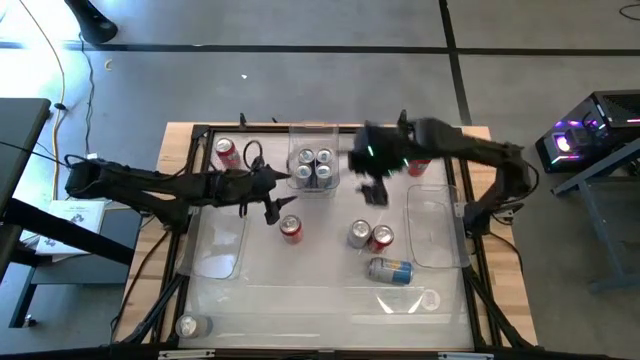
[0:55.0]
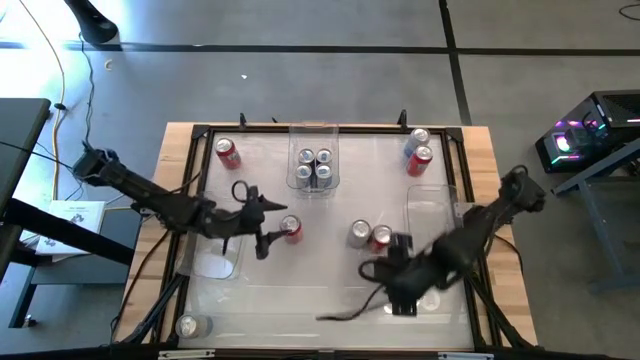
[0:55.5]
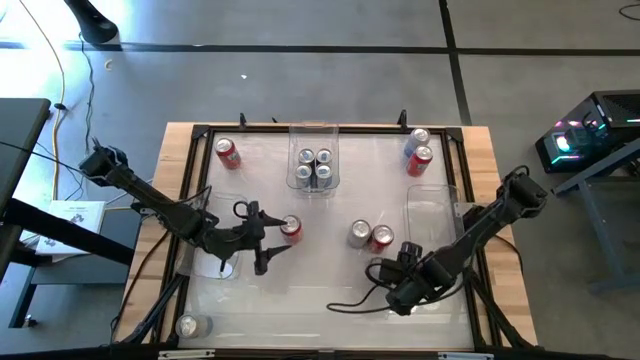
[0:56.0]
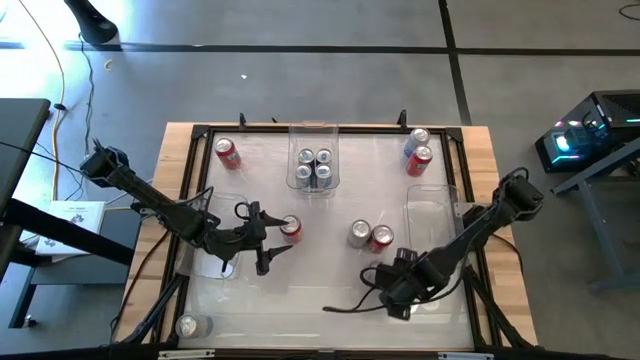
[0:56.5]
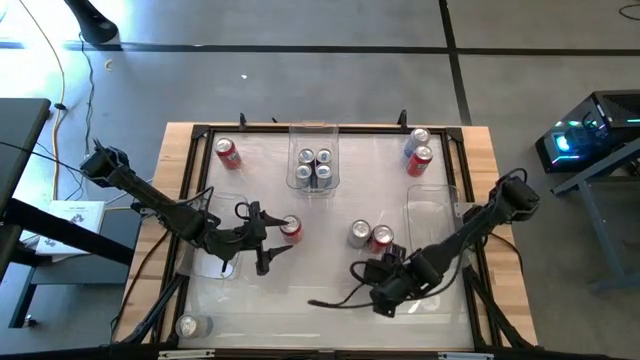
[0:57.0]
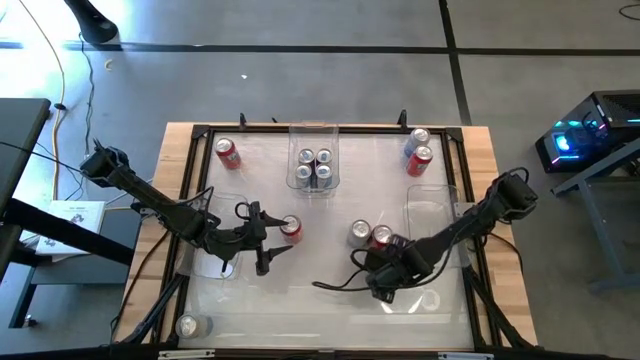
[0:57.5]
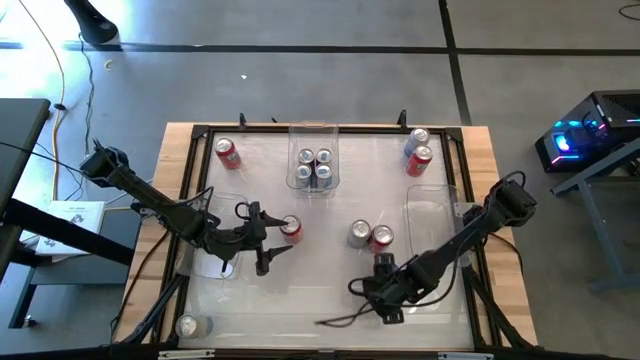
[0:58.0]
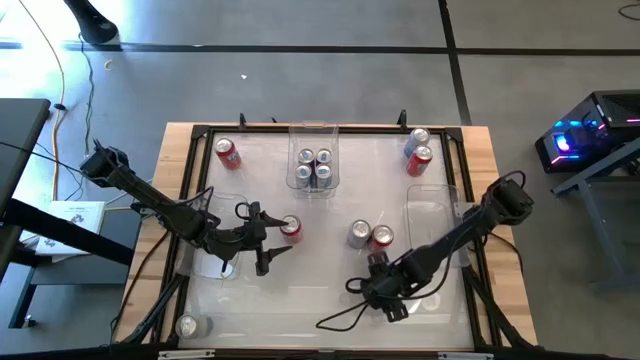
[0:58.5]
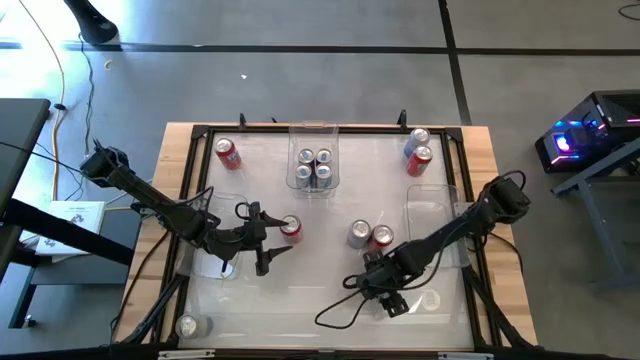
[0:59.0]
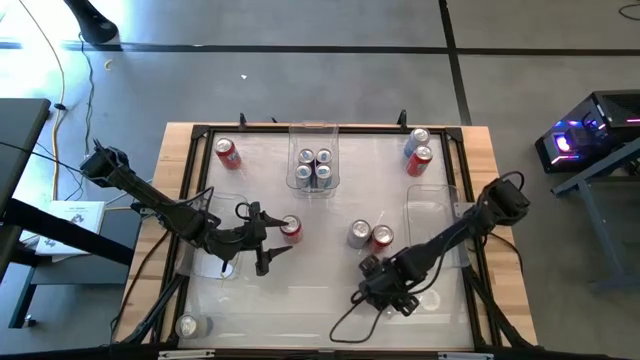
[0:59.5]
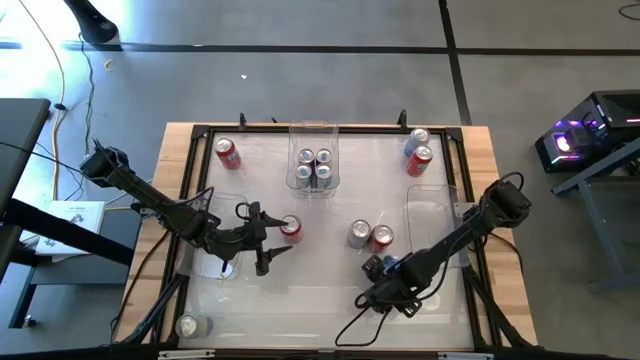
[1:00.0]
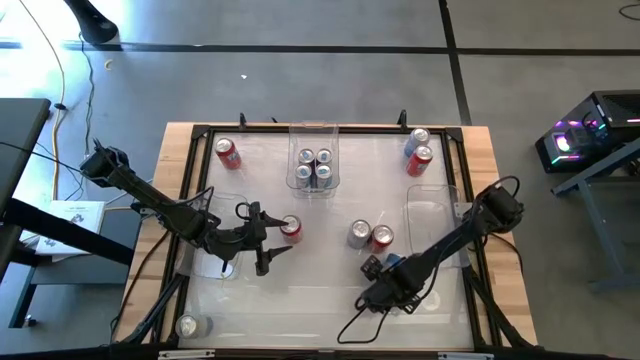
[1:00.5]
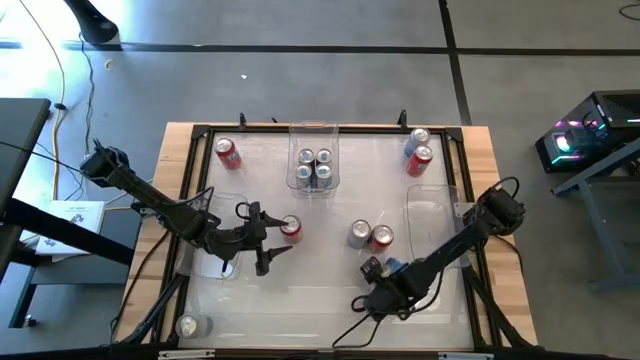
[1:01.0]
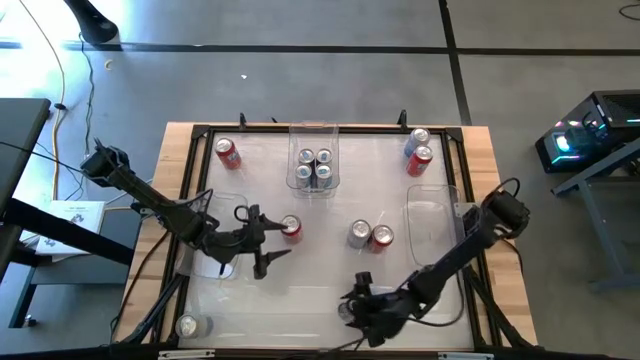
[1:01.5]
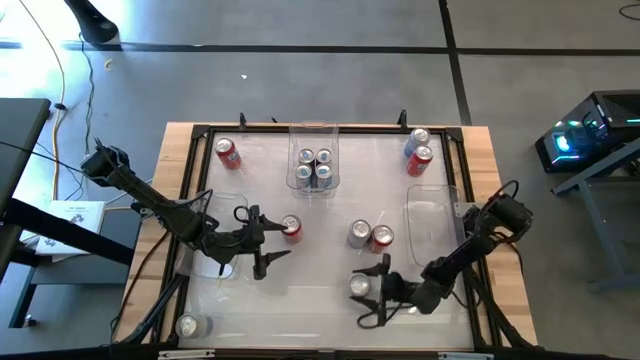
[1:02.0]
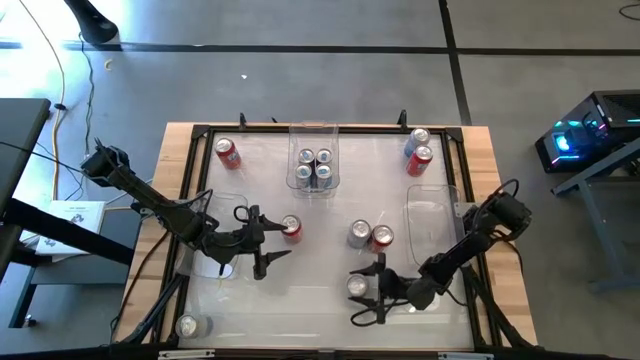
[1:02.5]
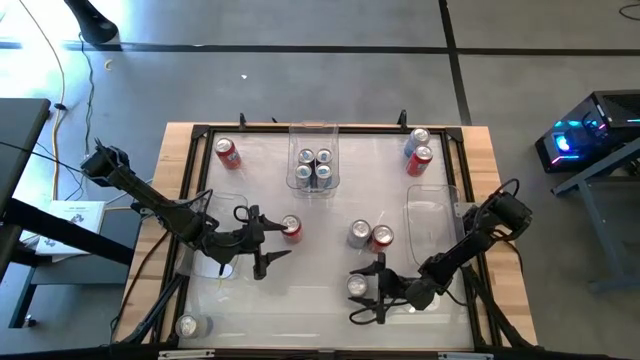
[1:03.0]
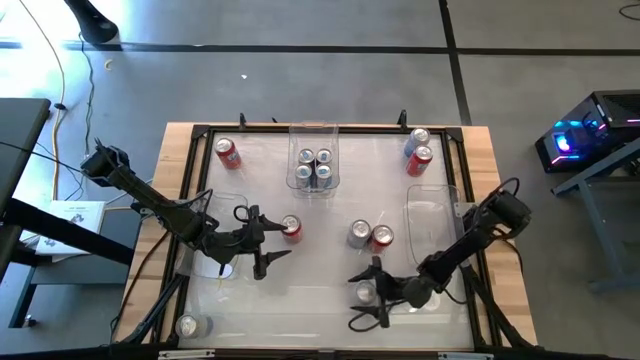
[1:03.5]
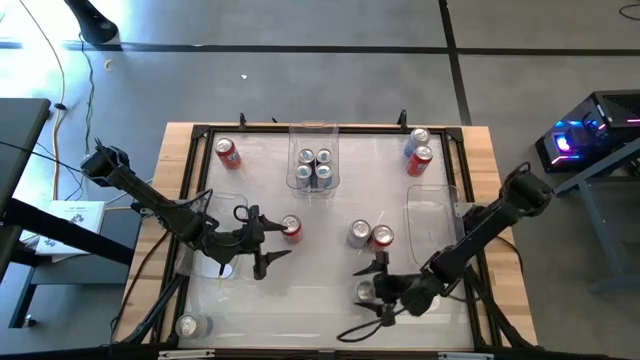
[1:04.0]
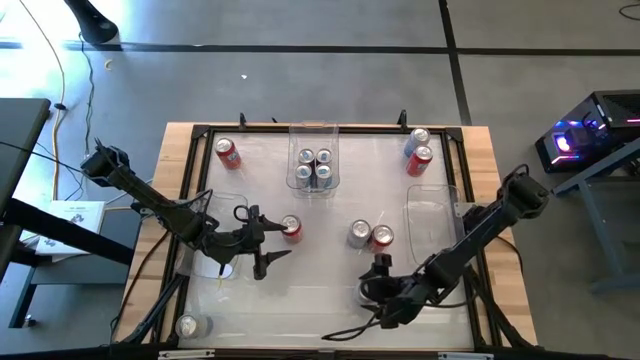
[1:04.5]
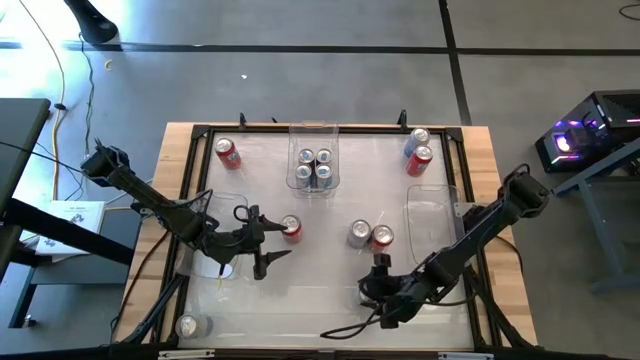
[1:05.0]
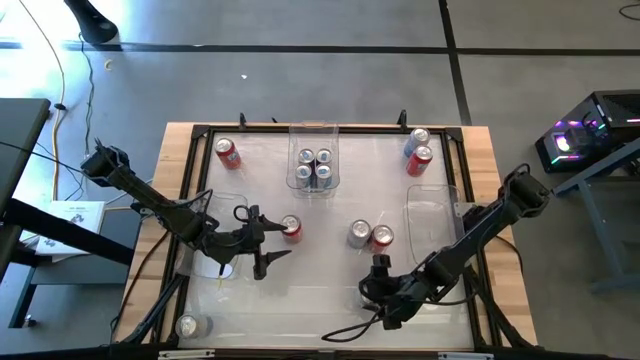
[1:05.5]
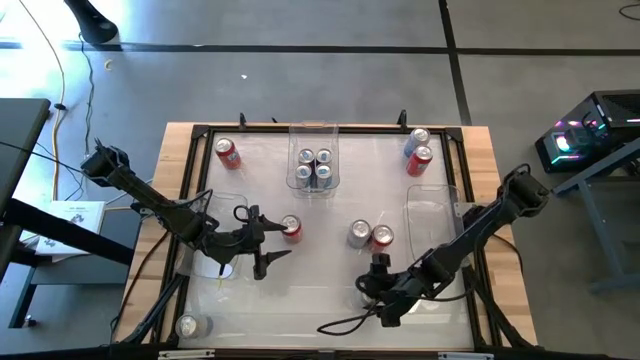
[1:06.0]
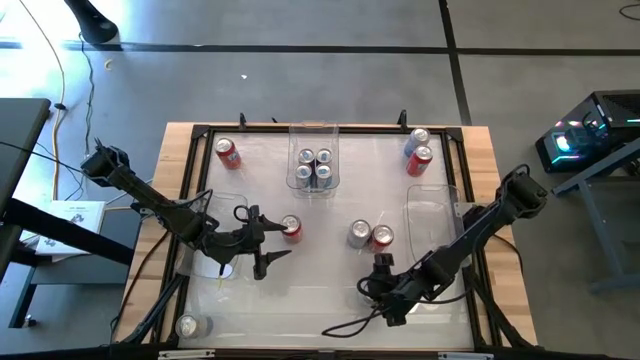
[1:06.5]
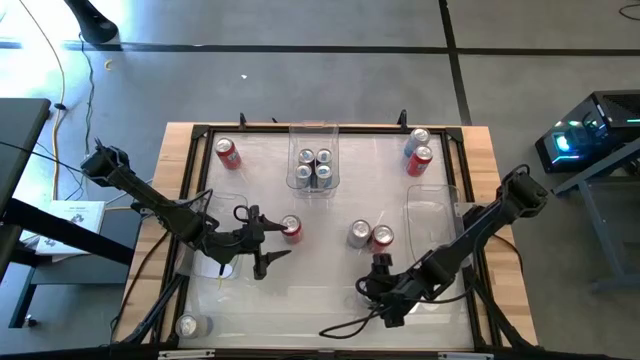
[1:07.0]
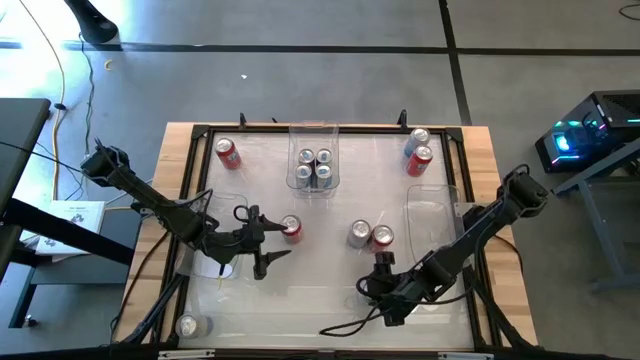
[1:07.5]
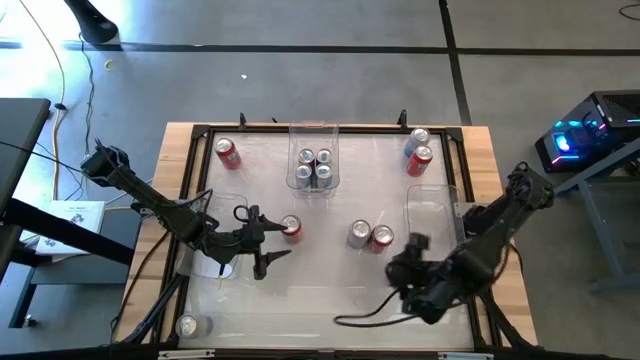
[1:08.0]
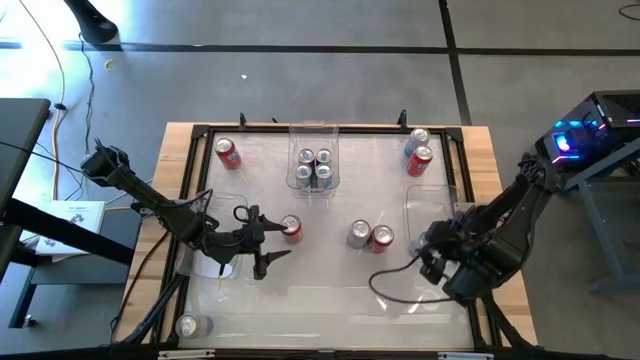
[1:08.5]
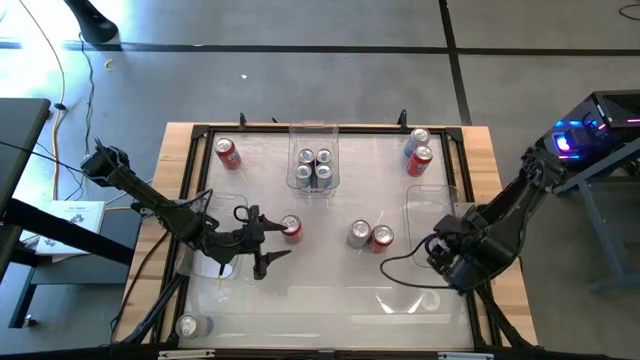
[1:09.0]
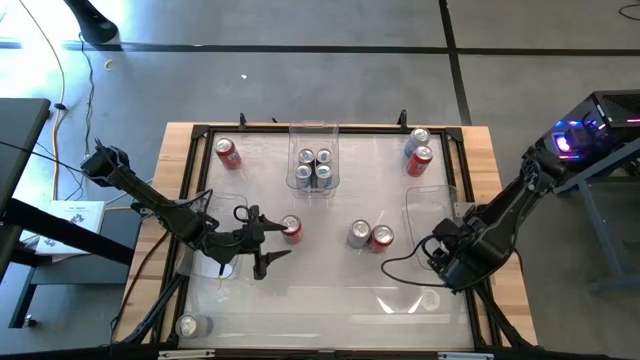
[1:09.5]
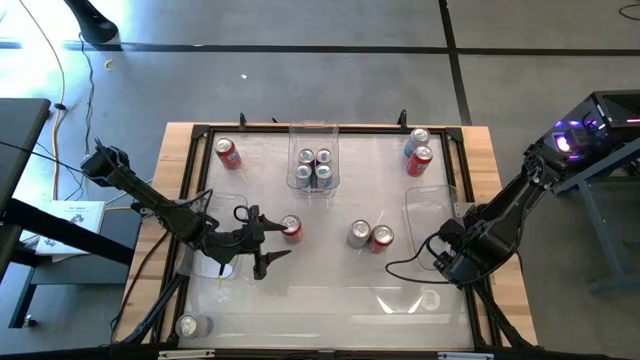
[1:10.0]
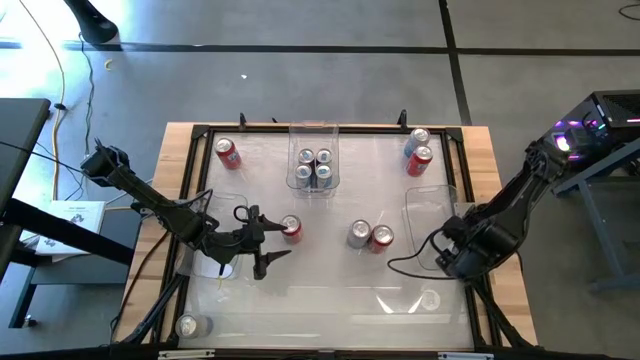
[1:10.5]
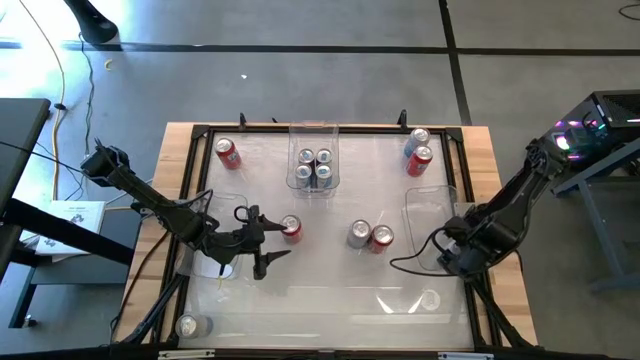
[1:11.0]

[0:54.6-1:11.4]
Task: Sort soda cans
Put the bottom right blue-white soda can into the bottom right transparent bin

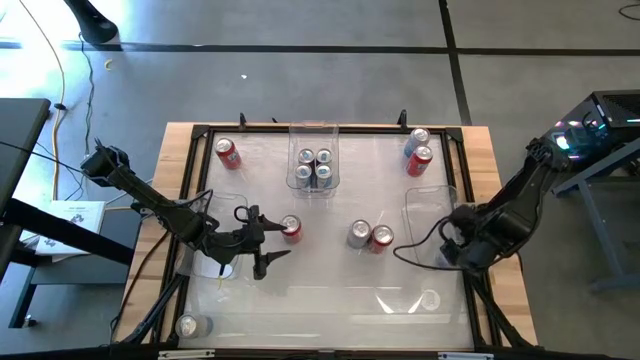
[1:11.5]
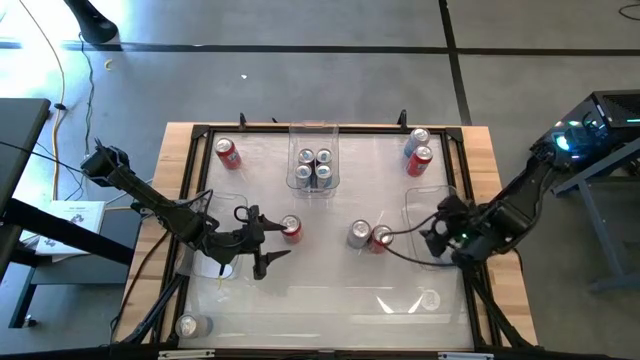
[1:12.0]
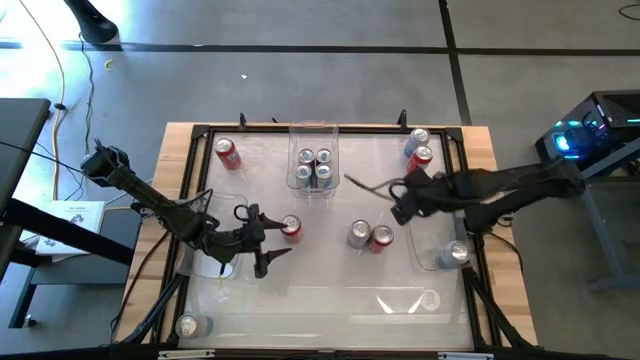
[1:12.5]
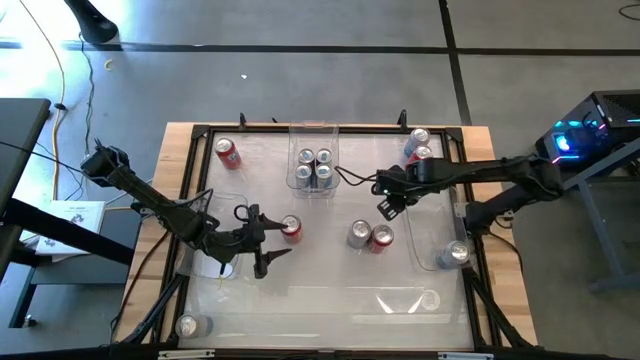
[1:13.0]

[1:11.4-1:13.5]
Adjust the bottom right center transparent bin

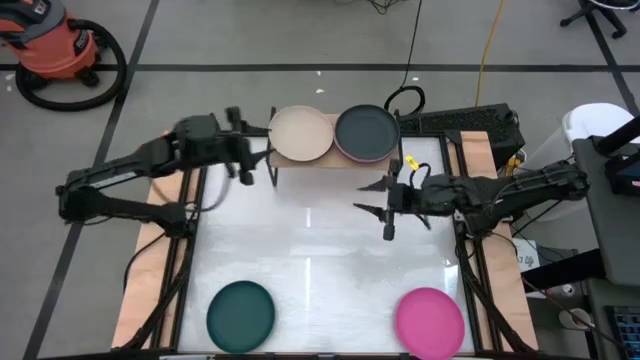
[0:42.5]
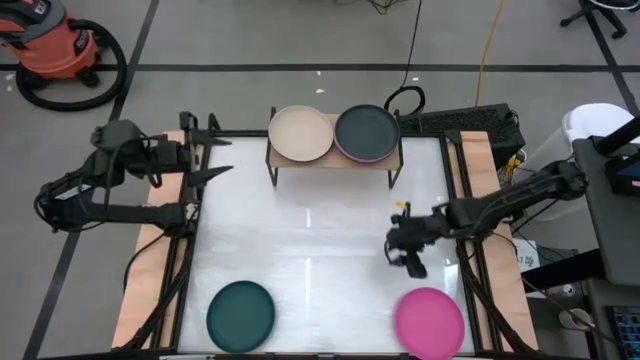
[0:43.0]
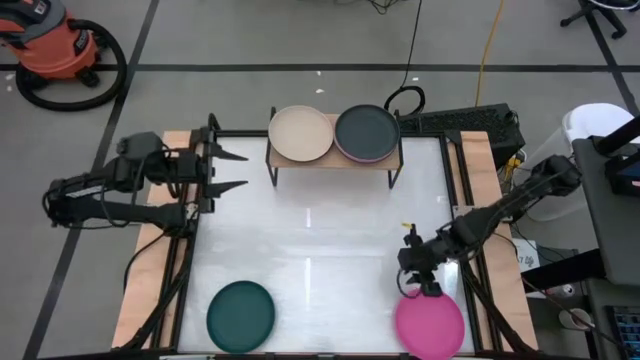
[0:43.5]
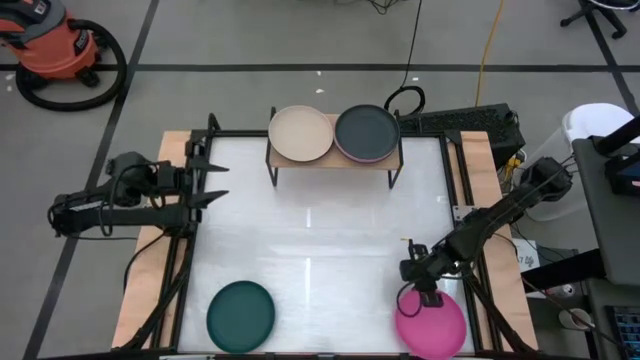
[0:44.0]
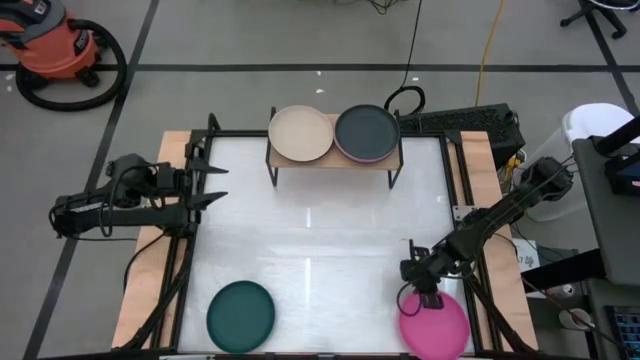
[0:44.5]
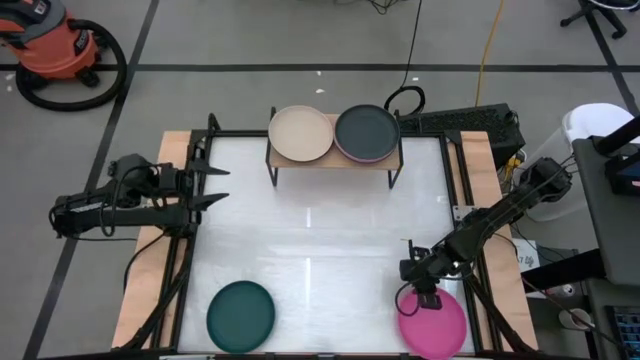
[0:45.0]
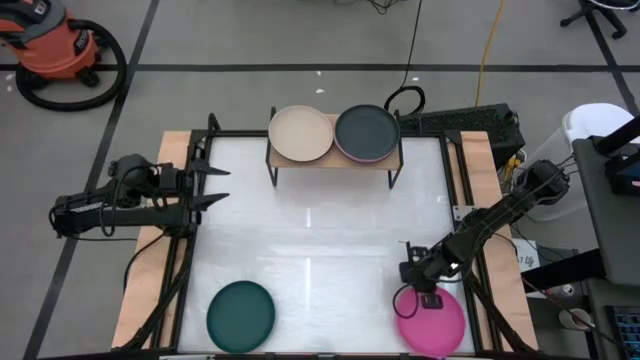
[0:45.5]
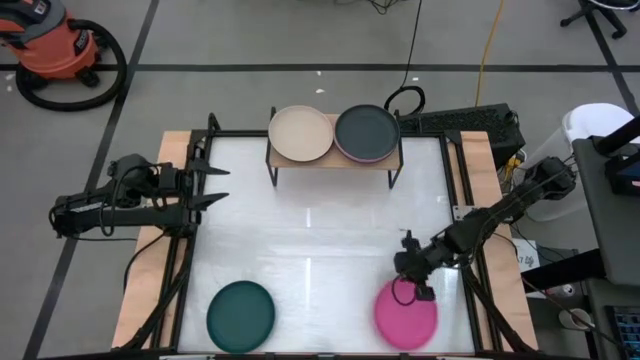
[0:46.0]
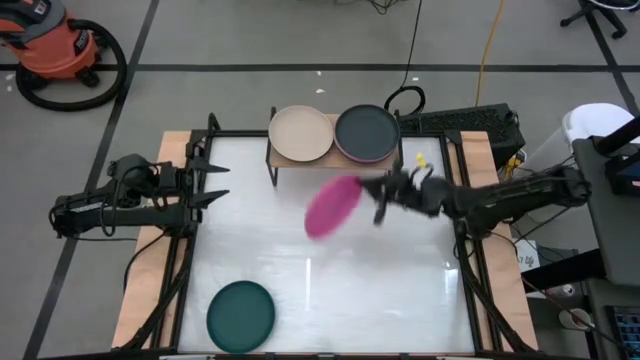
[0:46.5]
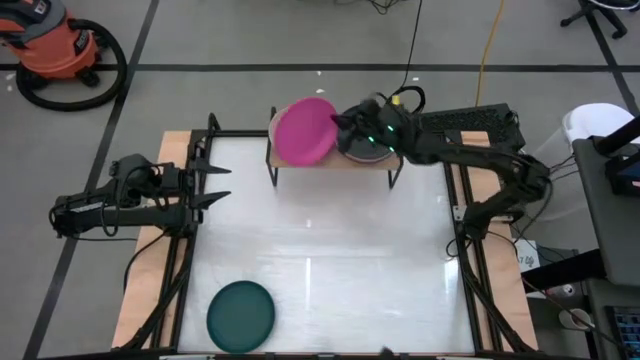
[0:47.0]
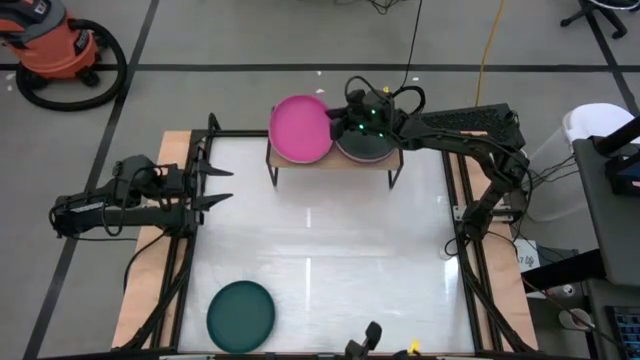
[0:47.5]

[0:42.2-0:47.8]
Task: Place and stack plates onto a shelf
Stack the pink plate on top of the light brown plate on the shelf
